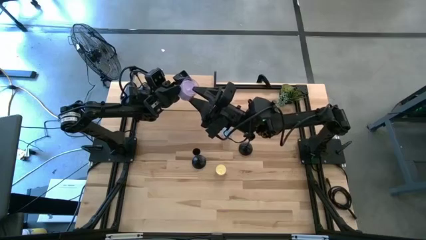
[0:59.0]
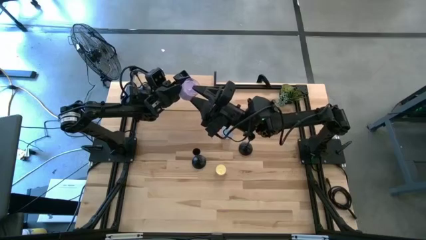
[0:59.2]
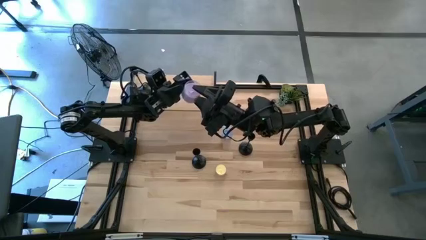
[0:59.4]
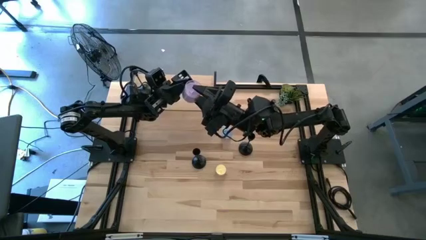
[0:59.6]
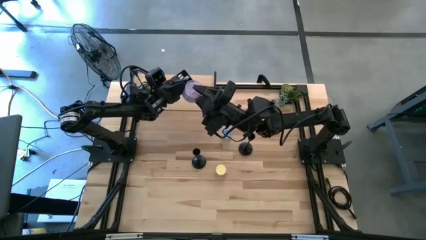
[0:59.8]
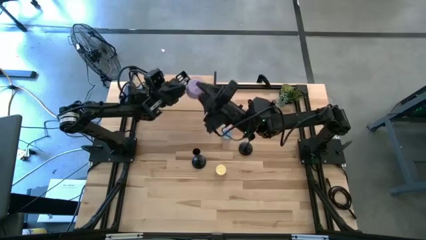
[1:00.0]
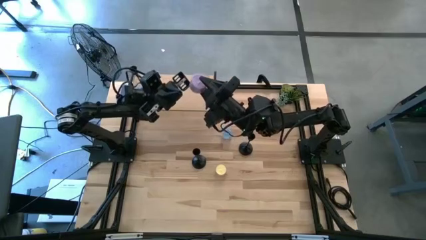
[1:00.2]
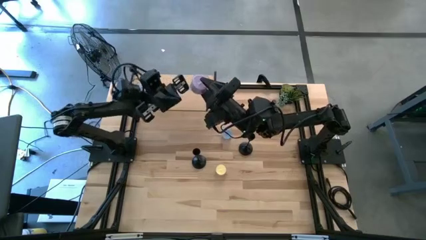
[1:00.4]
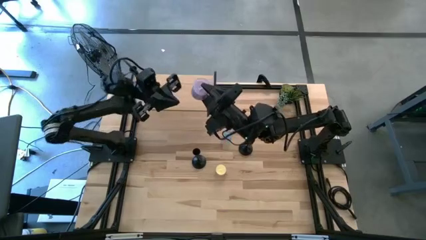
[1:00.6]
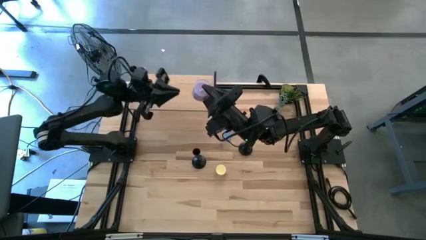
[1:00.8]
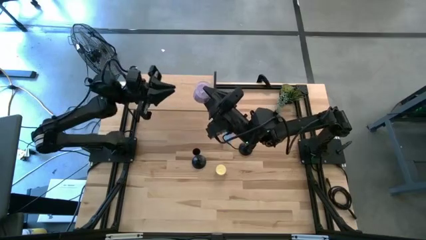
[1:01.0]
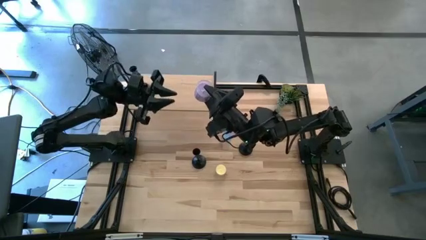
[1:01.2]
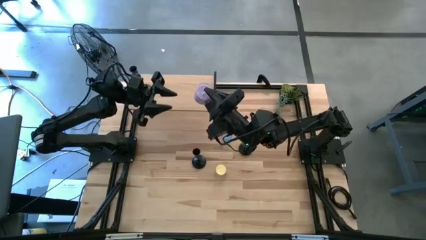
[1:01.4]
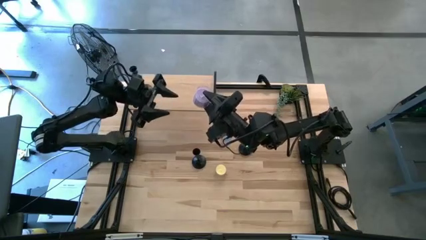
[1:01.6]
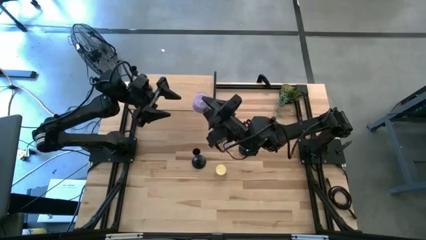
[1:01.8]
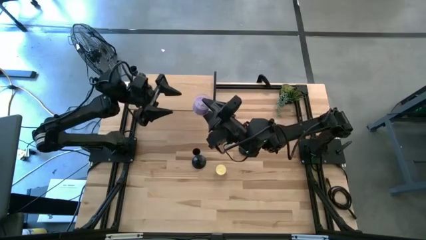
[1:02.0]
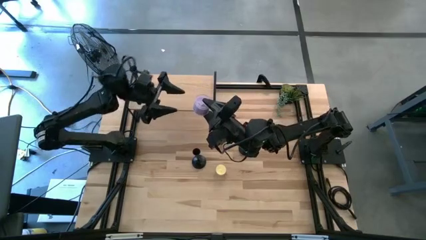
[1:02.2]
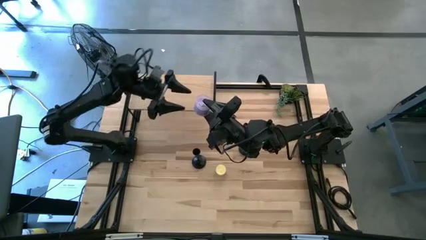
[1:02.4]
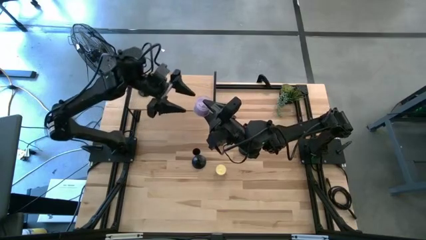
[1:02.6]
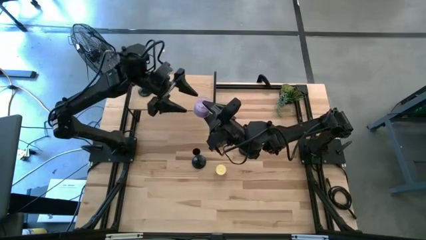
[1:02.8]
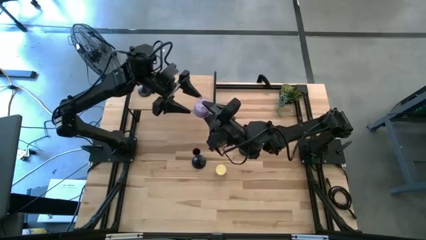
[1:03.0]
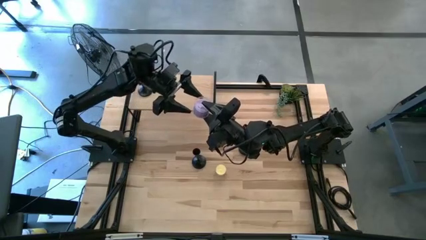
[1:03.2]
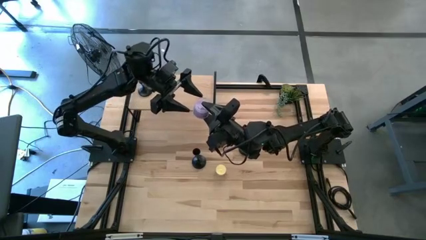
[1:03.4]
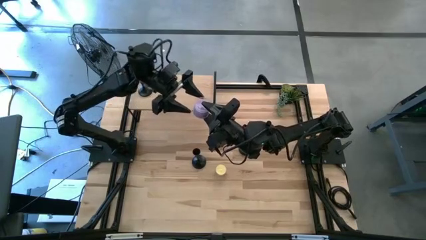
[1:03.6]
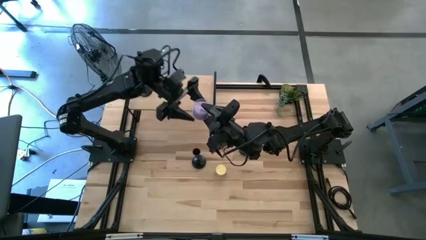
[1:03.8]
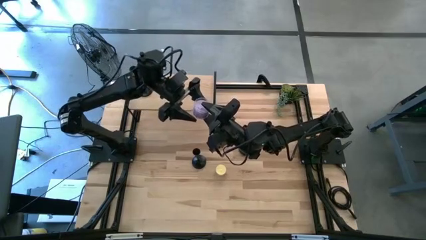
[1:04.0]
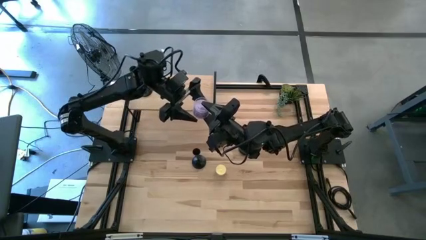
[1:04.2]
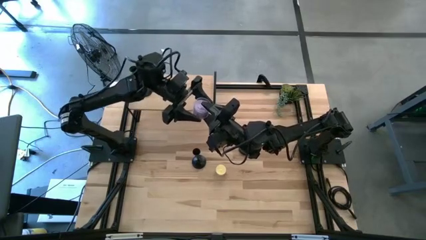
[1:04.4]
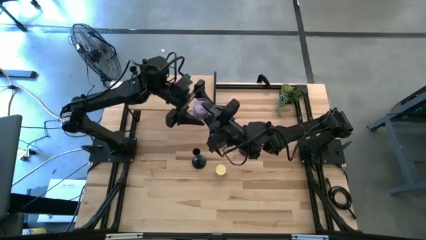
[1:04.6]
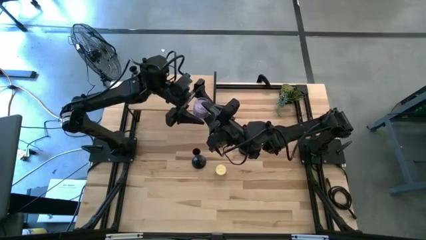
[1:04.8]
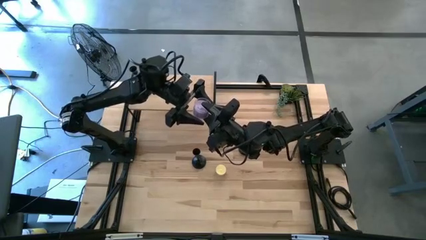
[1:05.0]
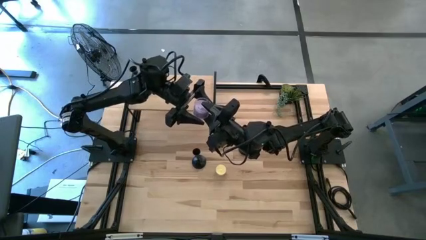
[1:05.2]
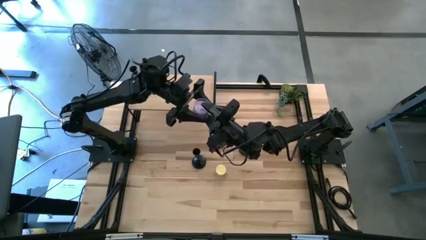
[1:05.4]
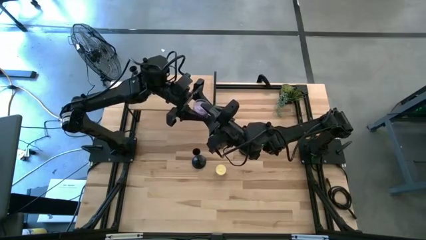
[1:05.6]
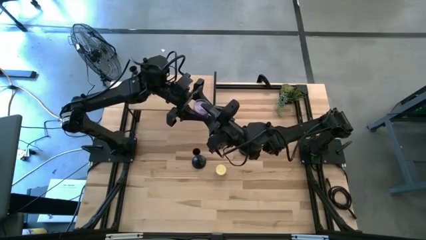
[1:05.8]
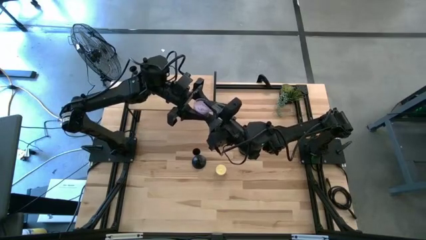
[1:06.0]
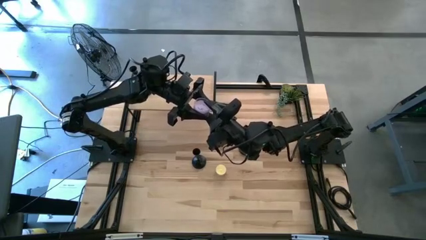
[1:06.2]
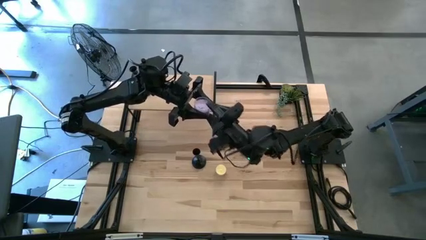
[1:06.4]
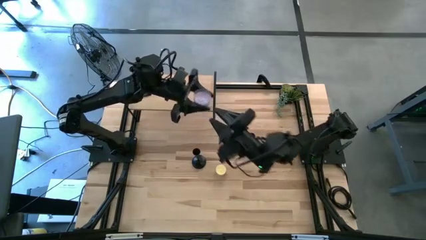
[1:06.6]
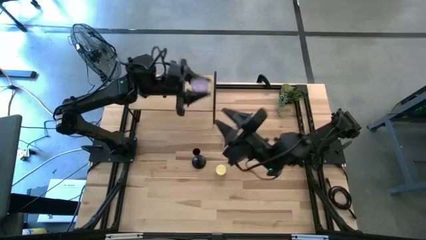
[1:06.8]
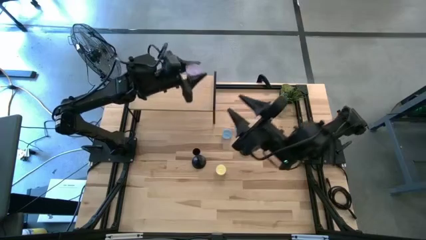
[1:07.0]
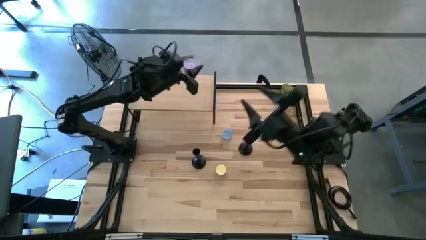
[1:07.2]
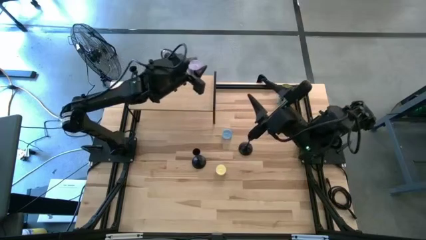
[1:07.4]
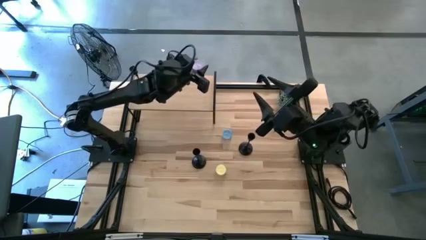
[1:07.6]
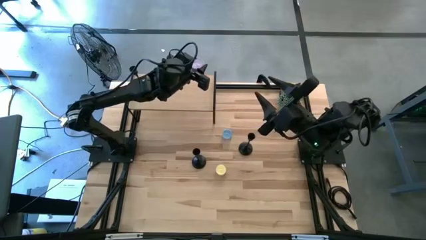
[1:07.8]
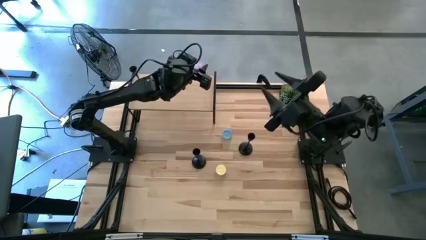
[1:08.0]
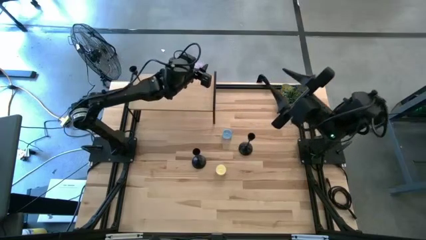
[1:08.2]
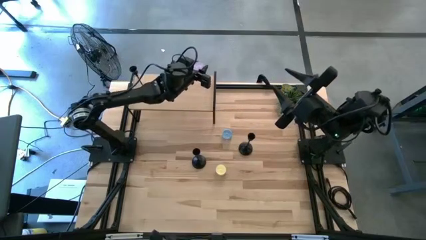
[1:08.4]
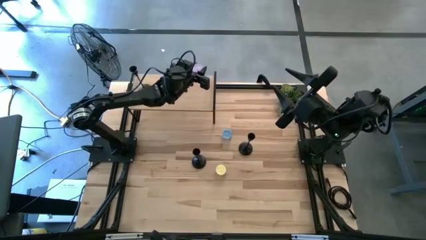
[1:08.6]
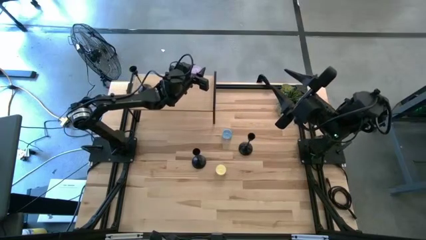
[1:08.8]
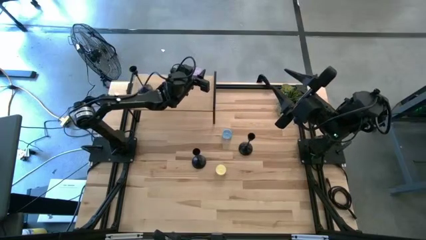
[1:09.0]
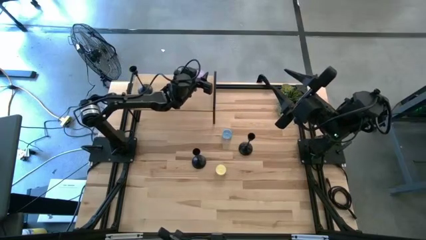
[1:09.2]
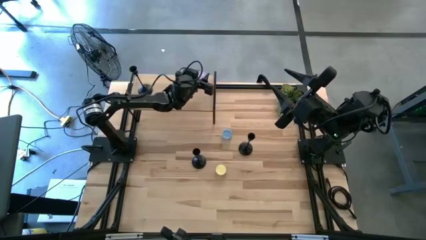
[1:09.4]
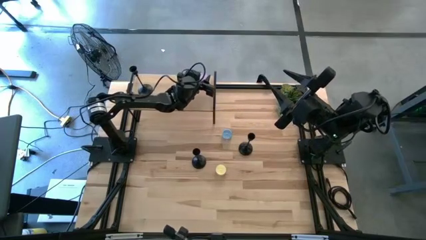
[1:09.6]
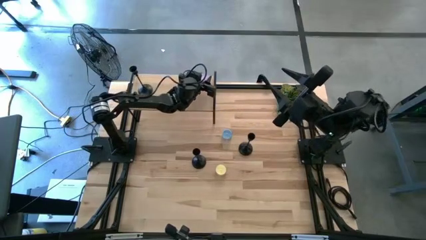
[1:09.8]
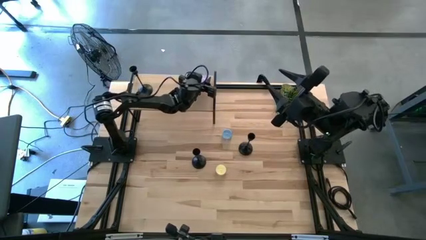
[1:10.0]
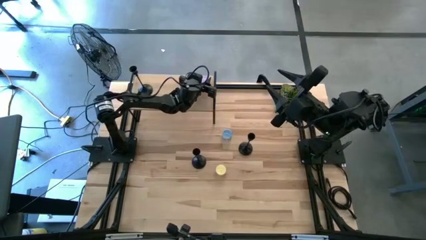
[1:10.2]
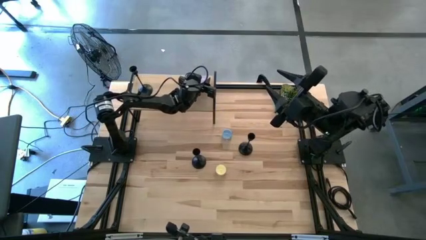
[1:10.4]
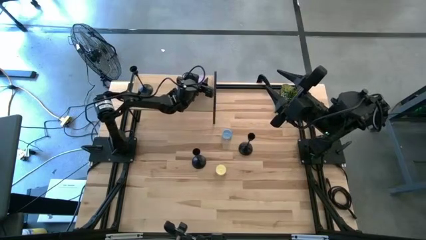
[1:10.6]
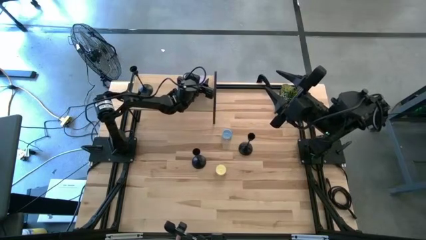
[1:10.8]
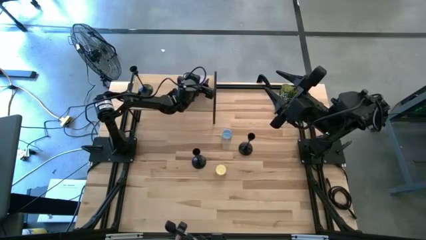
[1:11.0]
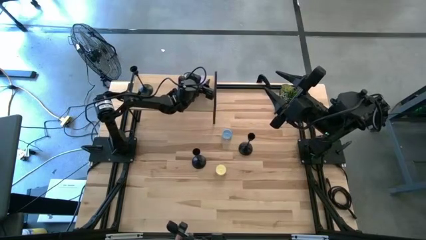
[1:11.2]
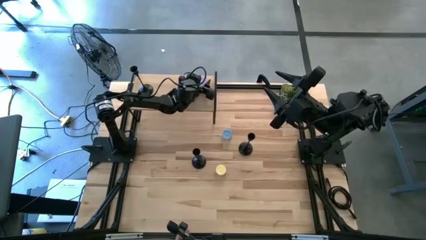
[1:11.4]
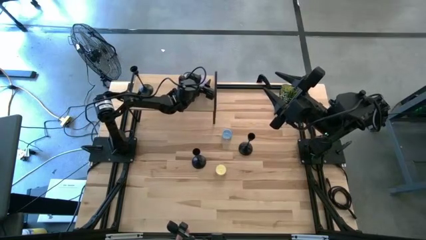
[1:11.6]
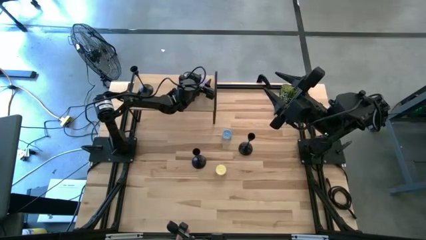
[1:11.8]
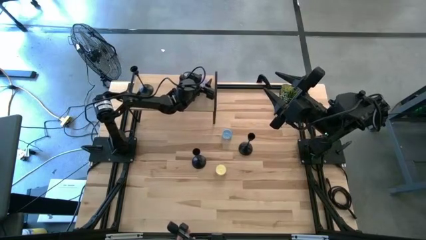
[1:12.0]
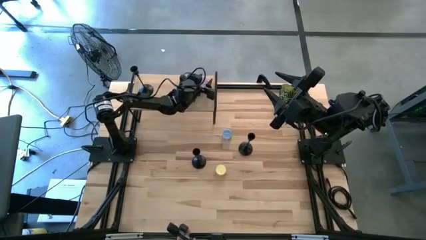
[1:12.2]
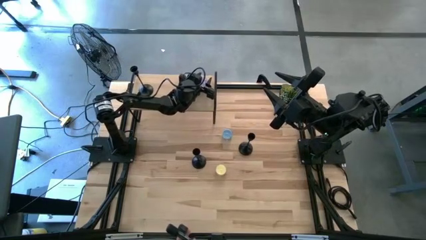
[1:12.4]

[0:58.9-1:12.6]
Task: Pick & Place candle stick holders
Put the purple candle on the shelf

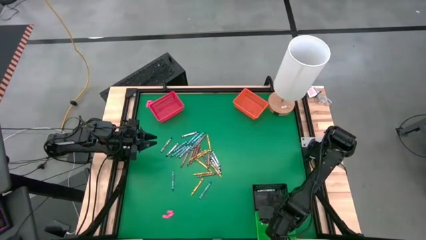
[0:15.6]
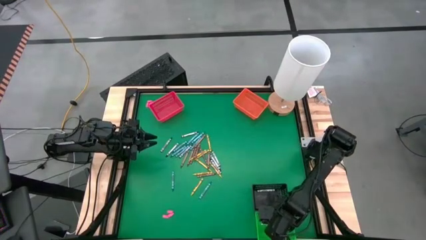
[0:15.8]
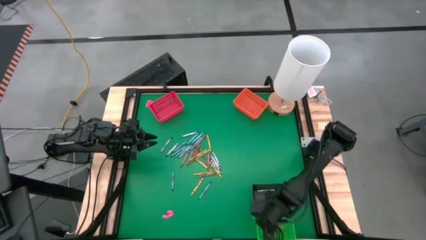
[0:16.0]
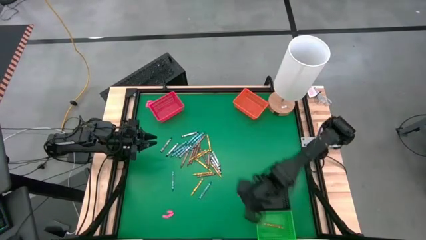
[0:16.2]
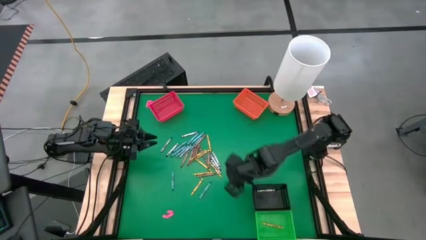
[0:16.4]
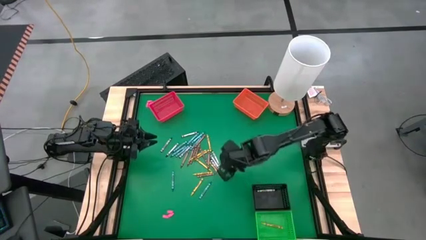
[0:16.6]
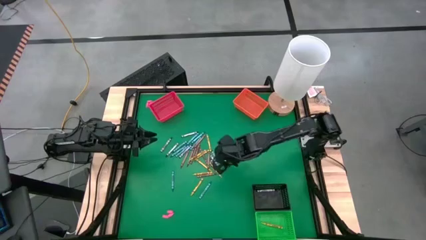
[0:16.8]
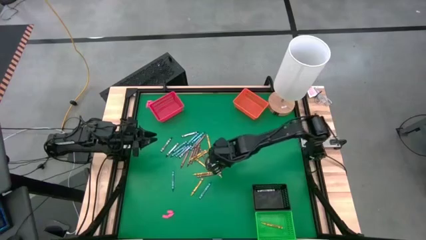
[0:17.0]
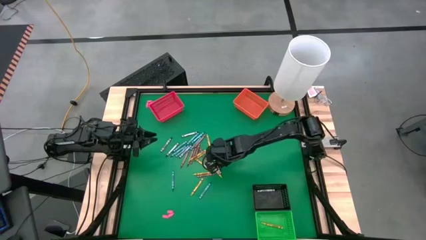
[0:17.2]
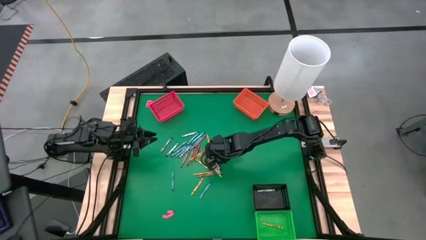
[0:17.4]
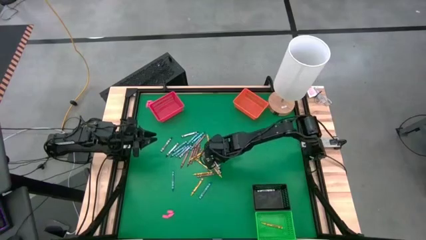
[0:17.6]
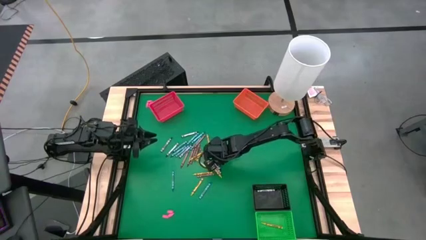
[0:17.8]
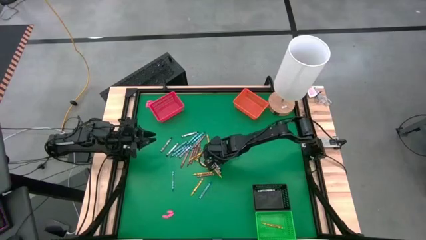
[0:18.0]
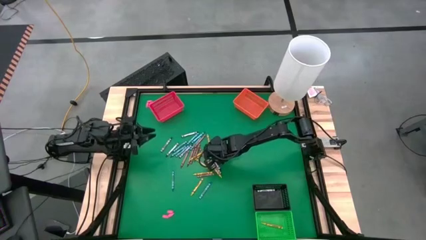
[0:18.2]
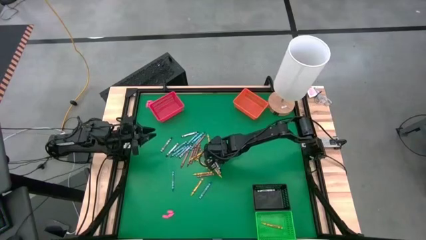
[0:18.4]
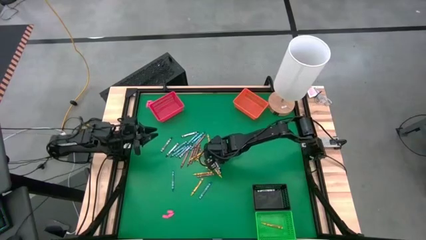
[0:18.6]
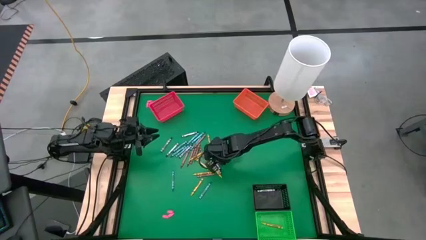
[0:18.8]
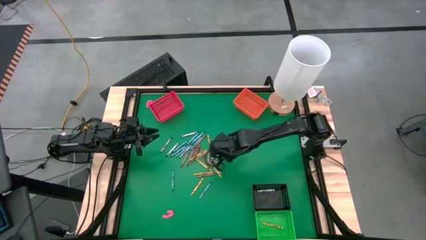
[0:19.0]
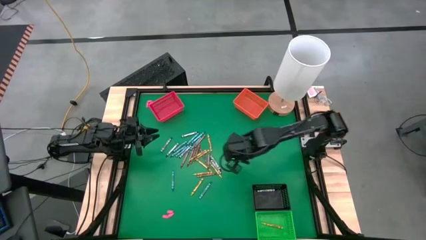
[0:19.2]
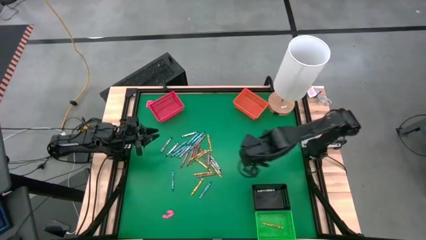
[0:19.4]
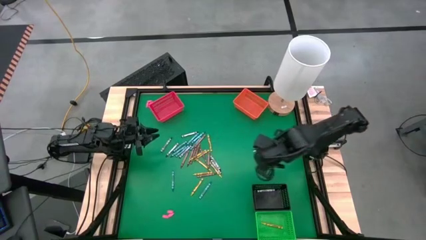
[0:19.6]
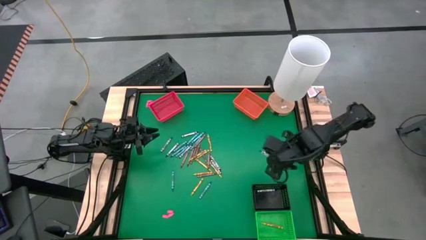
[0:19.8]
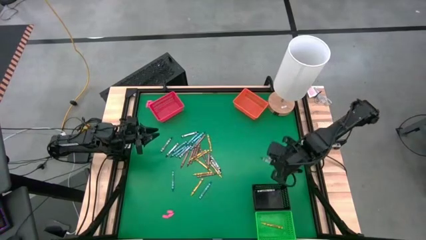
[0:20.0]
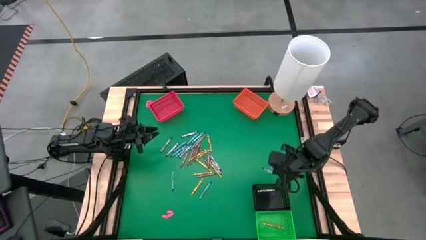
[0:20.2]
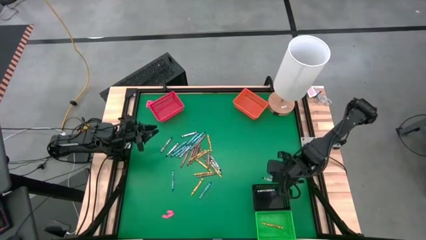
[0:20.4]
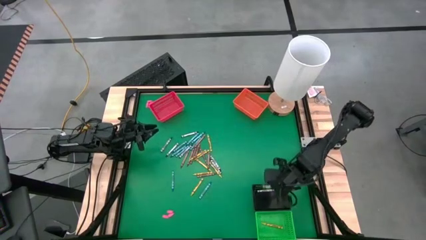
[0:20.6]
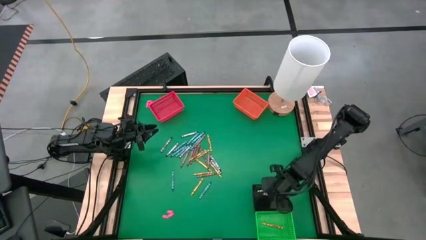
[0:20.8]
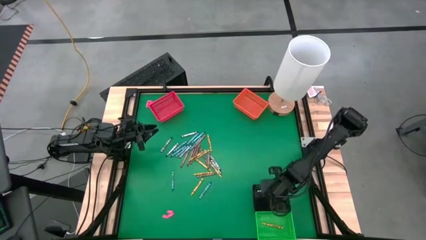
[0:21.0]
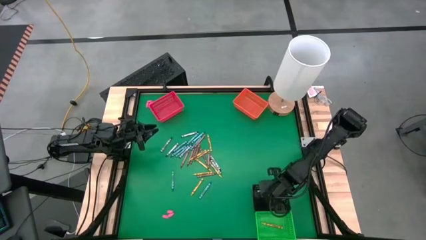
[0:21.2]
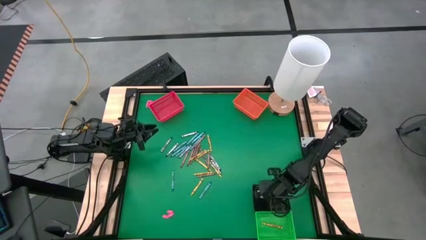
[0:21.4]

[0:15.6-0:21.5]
Task: Sort crayons
Put the black crayon into the black bin
